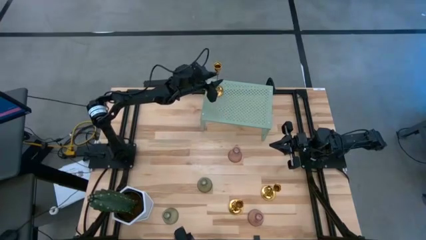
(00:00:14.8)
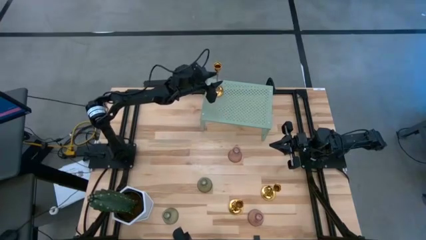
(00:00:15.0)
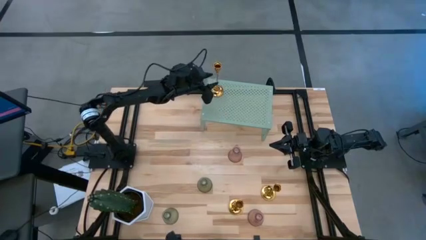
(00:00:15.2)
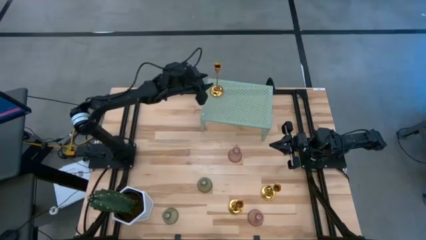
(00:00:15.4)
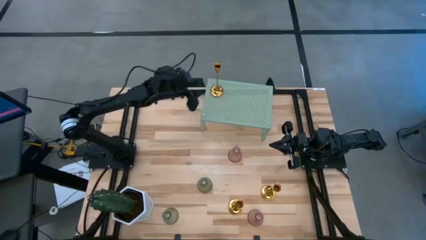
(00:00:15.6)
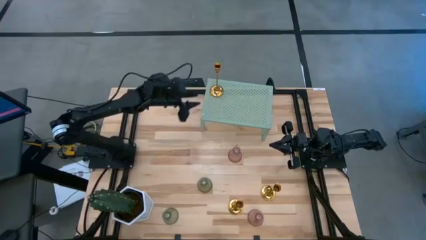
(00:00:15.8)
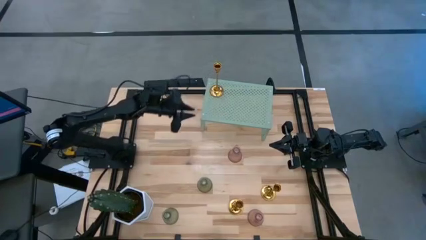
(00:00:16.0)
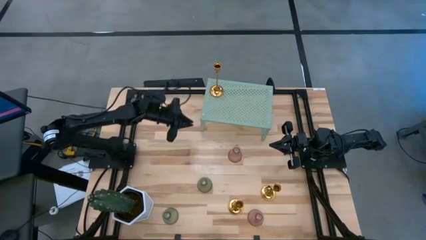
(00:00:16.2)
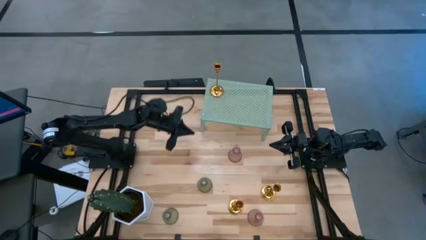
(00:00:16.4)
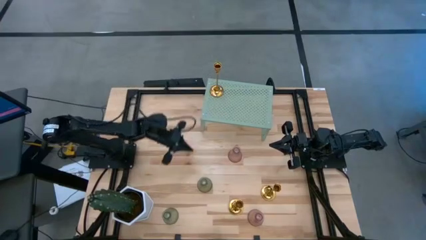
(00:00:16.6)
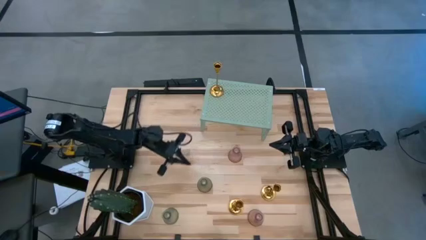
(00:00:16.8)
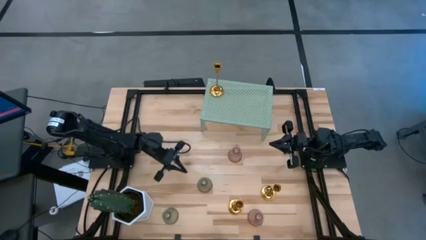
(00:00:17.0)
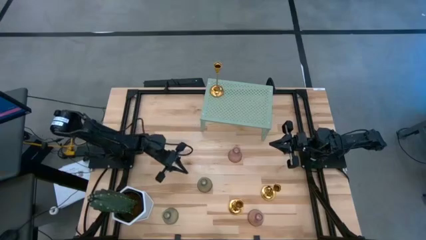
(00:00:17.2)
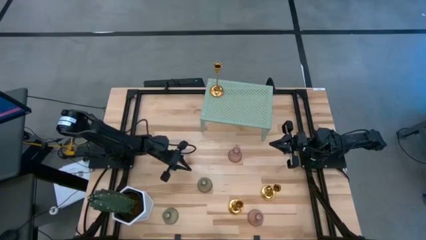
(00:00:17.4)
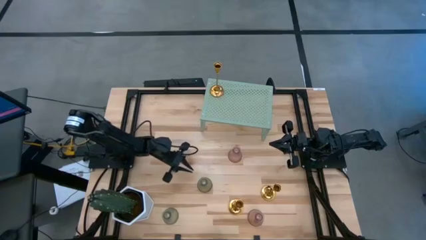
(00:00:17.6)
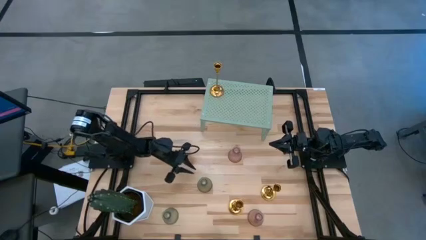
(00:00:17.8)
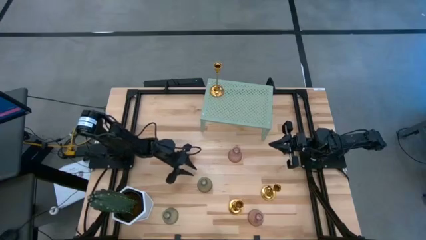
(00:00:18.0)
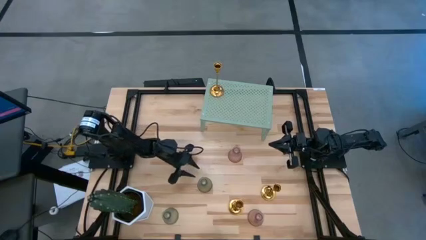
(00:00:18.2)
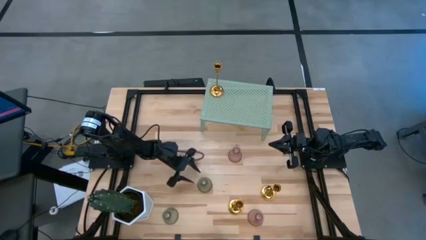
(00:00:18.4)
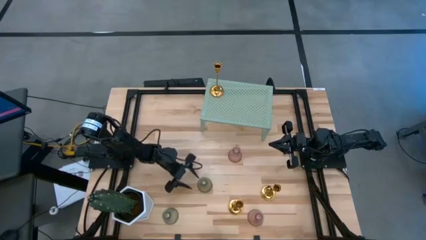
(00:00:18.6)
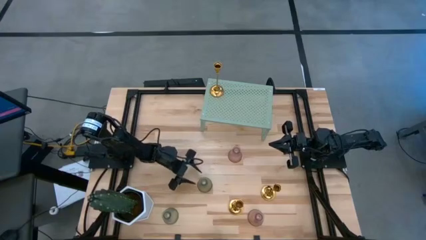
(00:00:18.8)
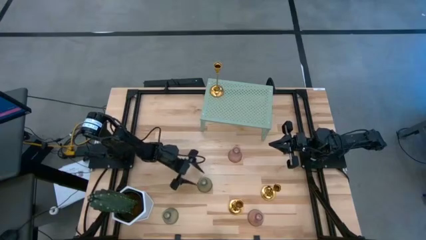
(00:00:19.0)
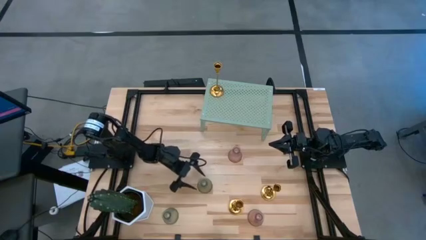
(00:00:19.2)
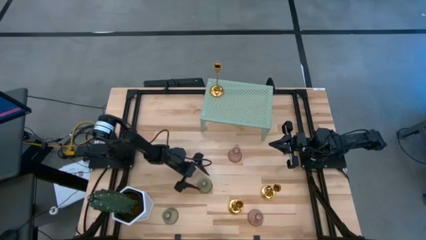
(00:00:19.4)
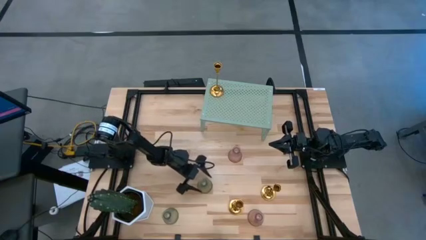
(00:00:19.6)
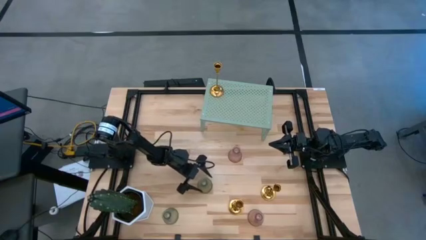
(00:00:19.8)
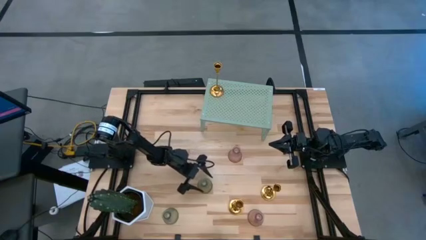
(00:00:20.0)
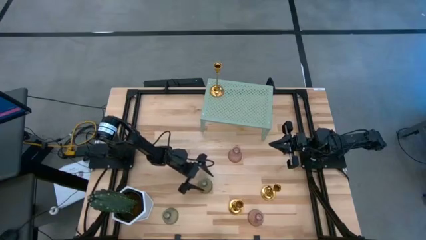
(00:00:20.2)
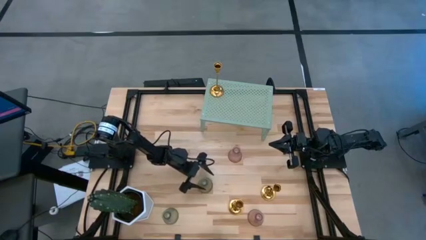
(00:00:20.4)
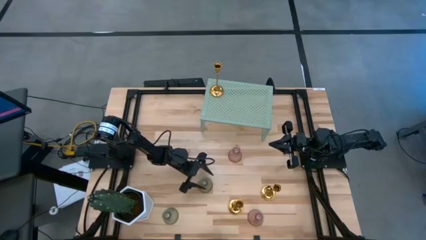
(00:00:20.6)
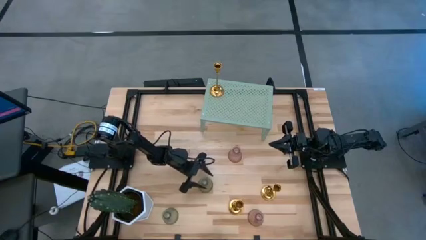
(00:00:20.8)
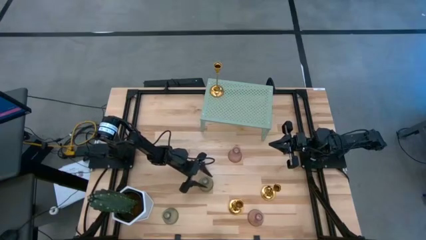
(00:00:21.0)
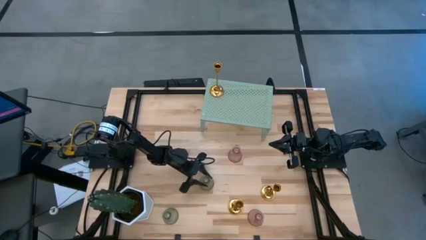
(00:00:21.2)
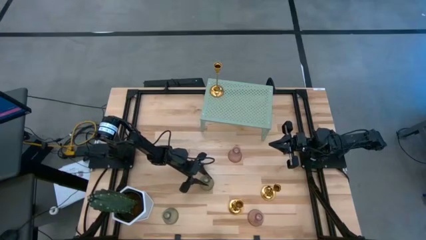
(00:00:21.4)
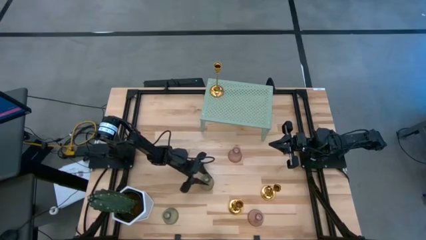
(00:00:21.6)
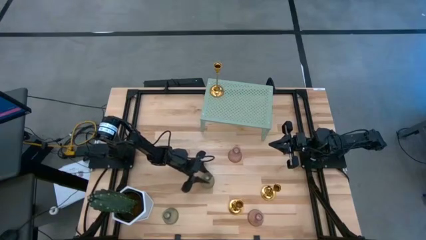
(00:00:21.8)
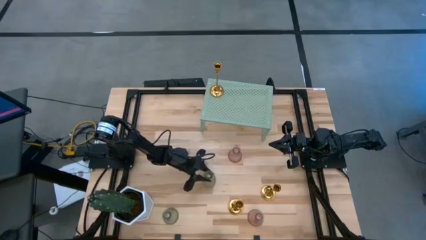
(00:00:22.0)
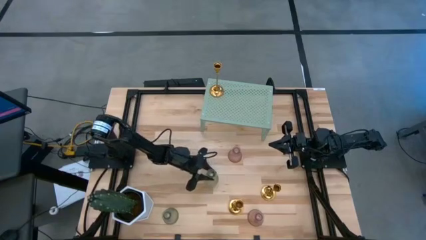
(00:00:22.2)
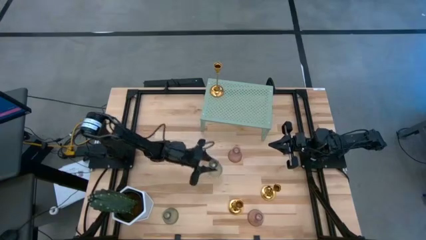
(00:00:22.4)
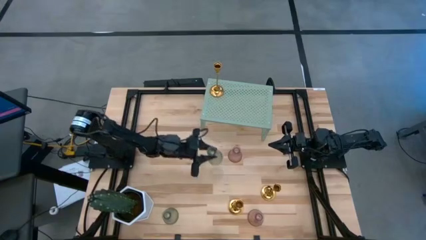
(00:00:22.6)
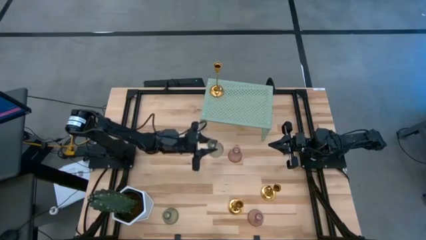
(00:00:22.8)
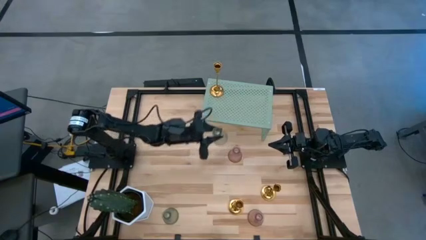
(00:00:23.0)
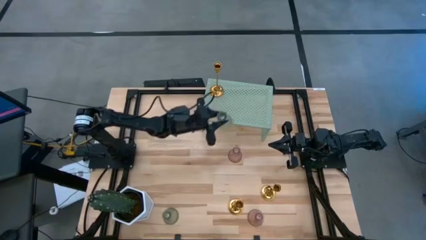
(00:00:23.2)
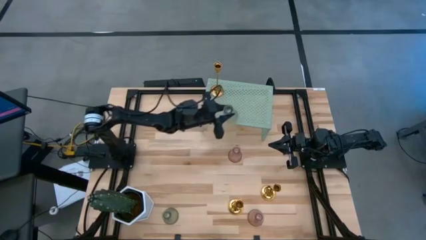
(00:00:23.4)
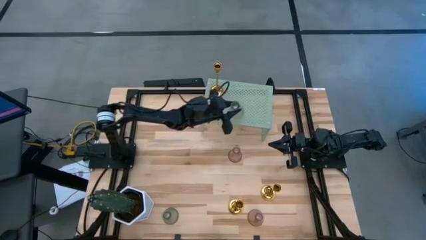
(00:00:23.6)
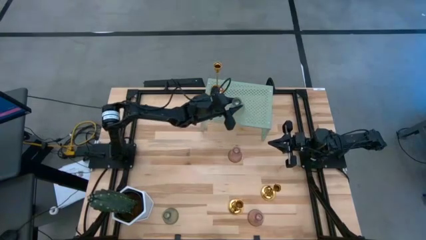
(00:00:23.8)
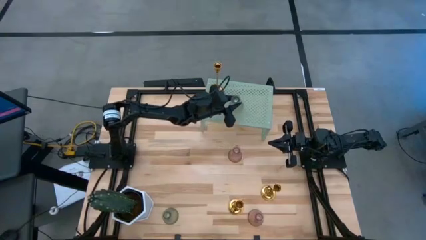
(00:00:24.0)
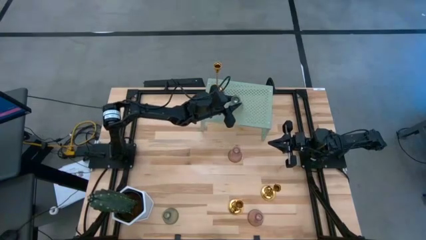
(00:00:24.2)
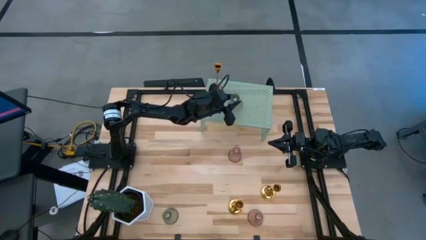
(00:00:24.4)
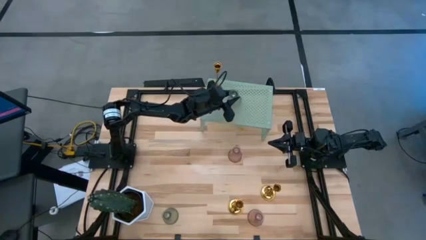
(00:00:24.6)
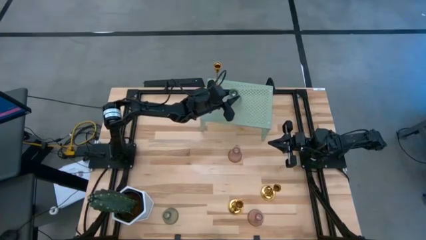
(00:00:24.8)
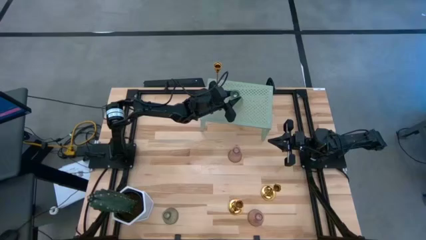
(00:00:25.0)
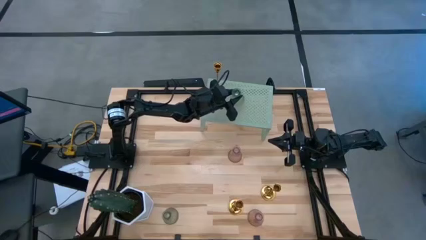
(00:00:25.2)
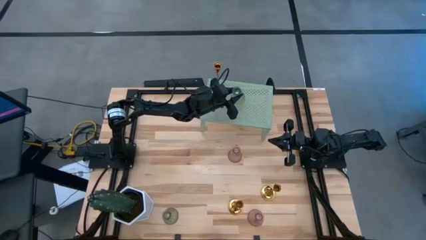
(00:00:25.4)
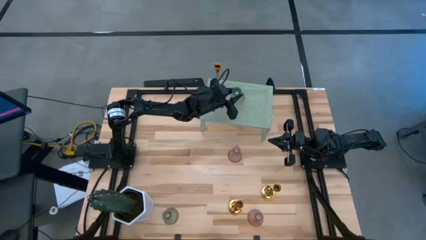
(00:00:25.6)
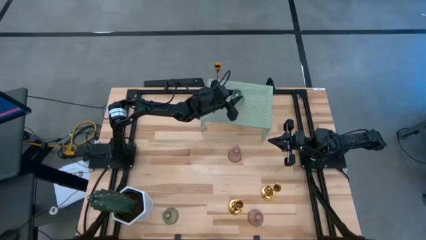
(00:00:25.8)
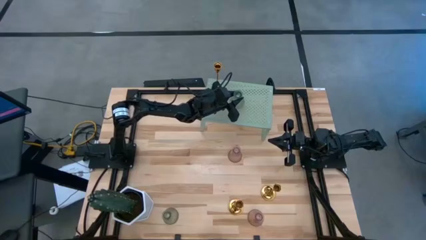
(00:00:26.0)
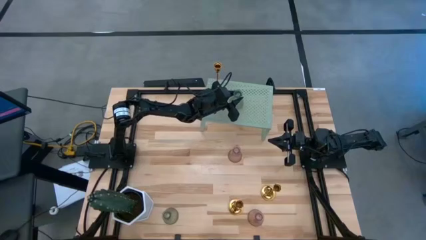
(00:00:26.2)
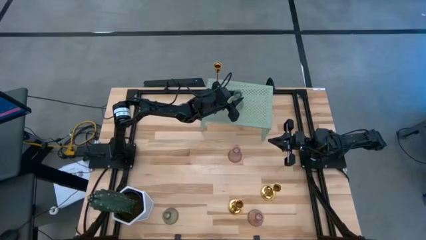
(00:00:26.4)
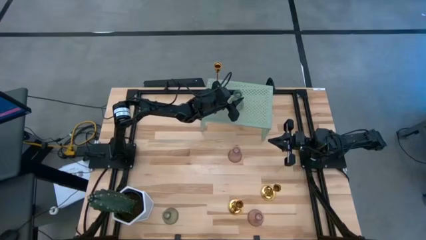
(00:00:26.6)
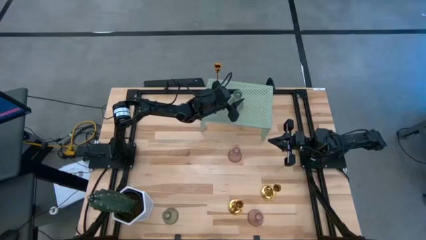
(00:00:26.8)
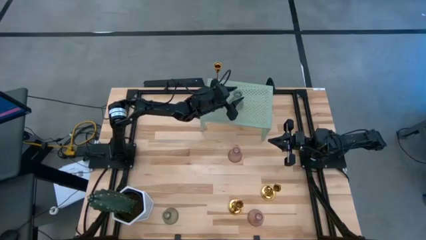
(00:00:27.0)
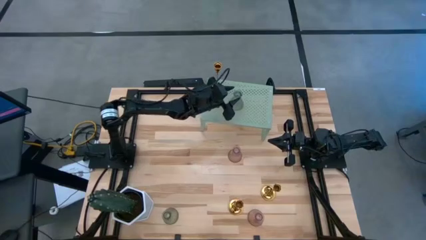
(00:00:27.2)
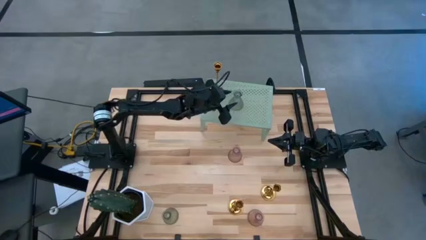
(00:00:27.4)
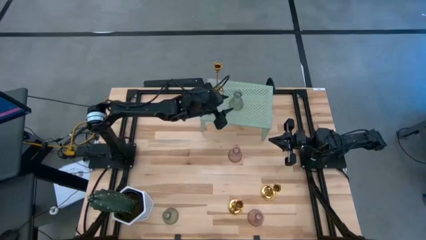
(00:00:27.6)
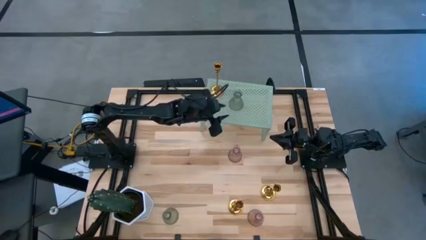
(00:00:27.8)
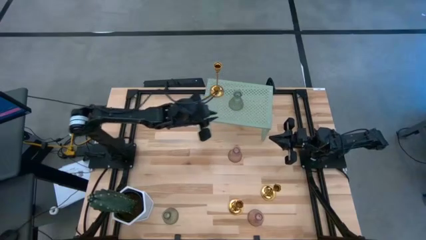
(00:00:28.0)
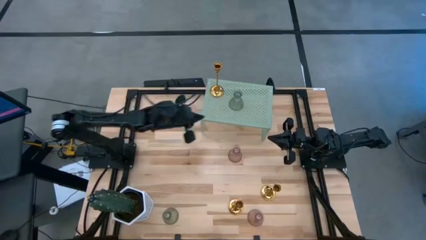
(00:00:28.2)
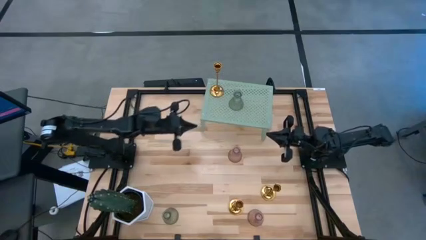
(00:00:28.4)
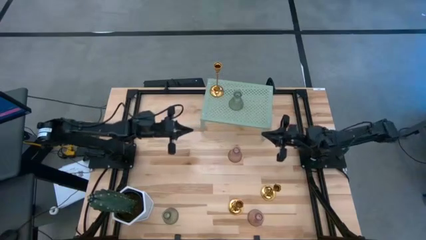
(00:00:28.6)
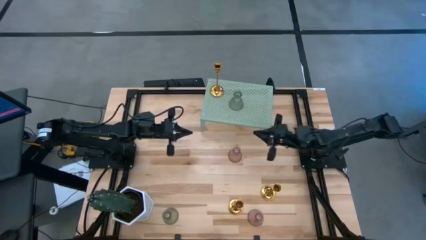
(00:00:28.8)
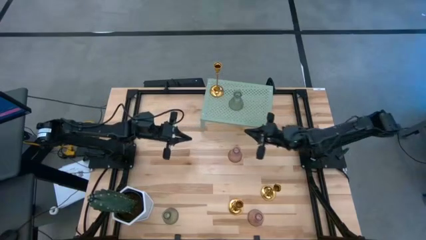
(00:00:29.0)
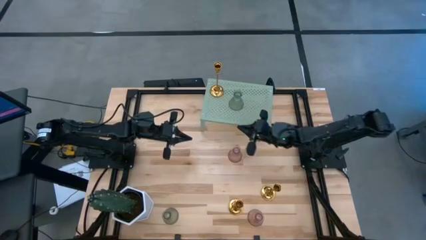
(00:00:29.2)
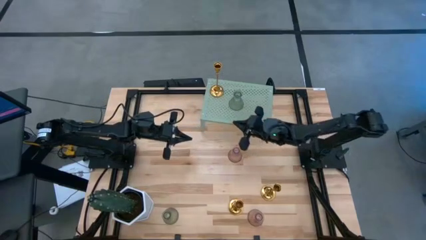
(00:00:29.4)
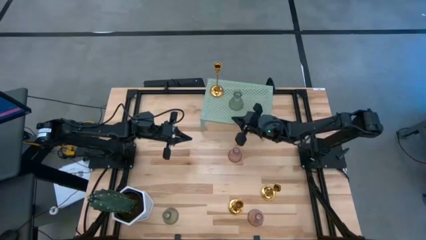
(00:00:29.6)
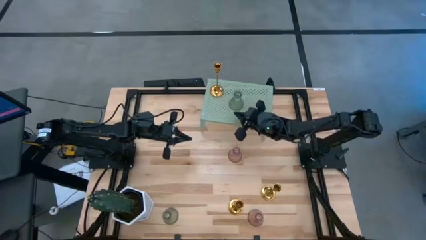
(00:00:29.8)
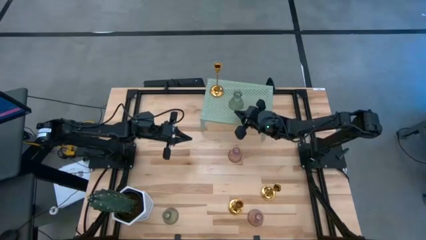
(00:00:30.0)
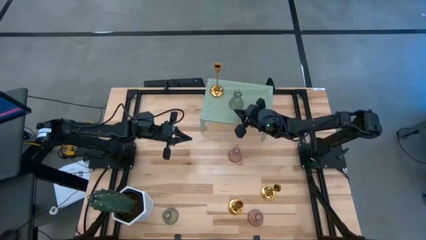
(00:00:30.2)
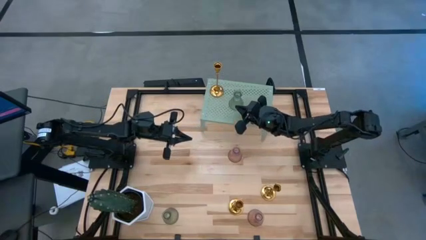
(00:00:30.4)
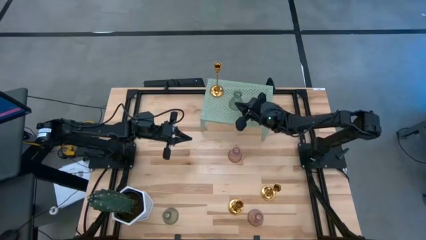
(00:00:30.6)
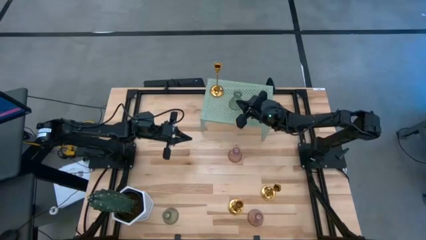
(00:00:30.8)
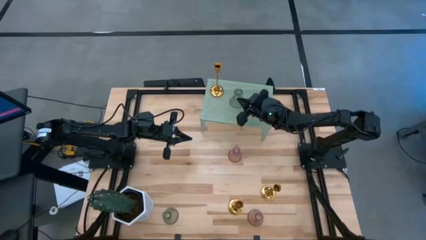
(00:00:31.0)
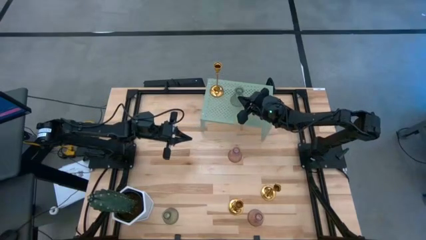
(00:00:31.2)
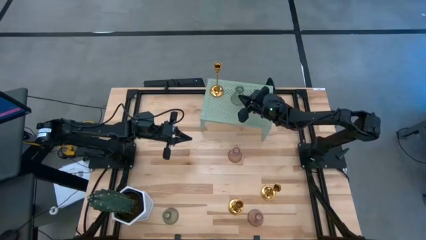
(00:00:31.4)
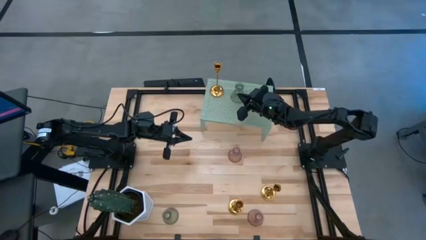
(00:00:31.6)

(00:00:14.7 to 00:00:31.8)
Task: Pick & Place candle stick holders
Put the top green glass candle holder on the shelf
